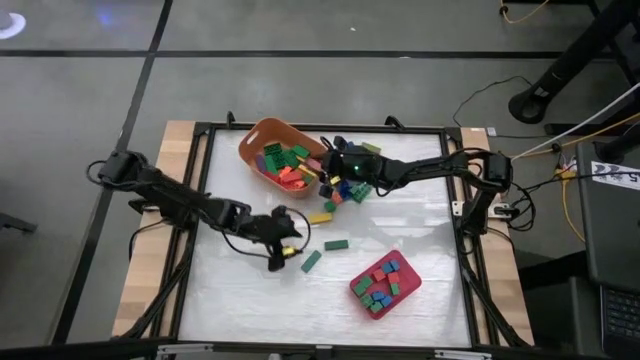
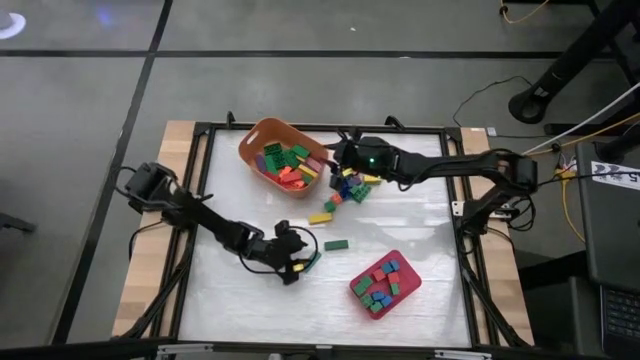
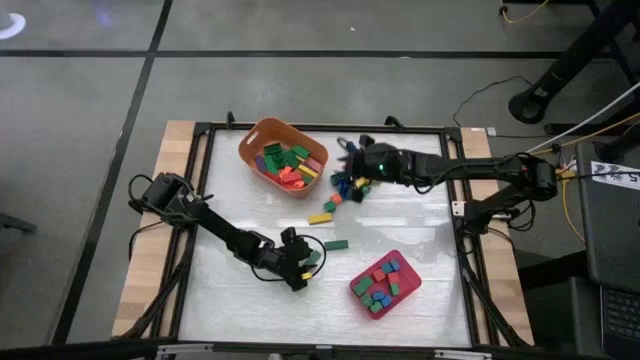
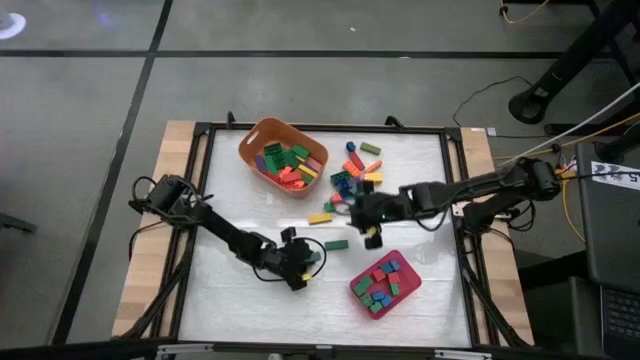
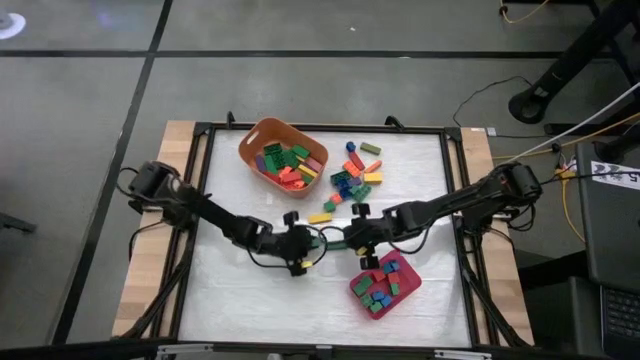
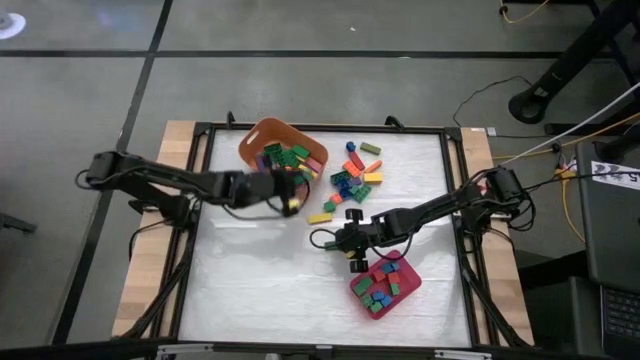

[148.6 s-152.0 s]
Task: Sort blocks by size
Put the large green block into the orange bin

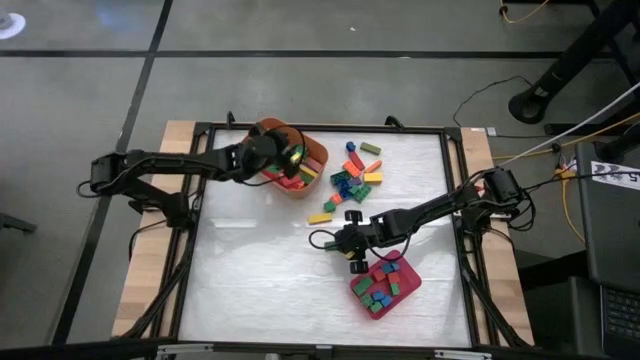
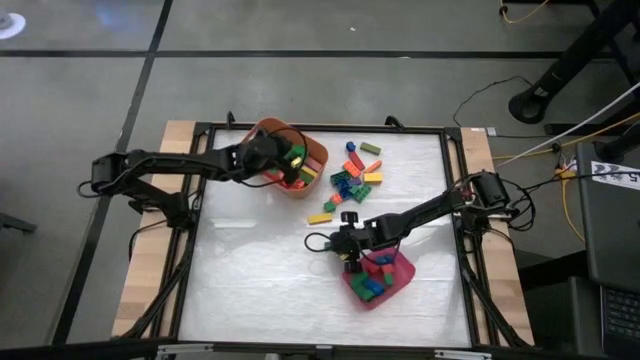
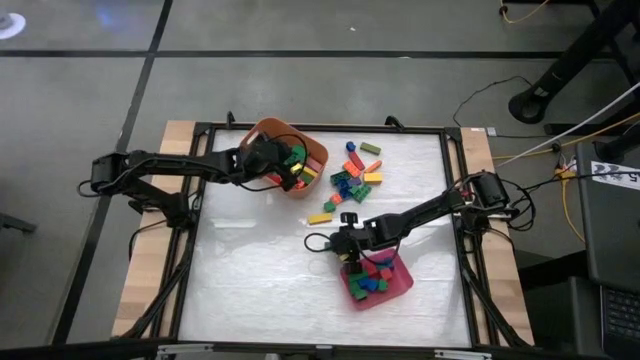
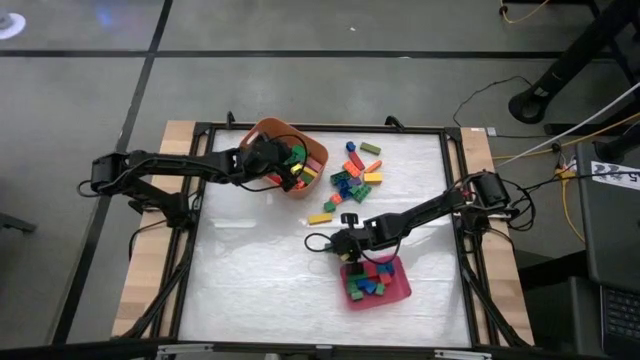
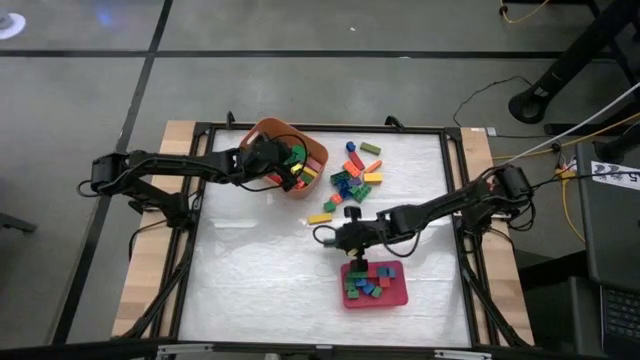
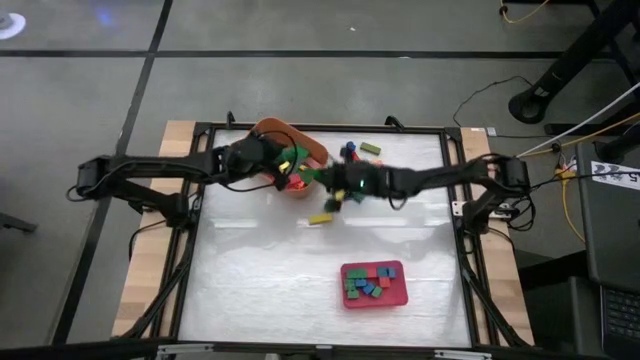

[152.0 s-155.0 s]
Put the large green block into the orange bin

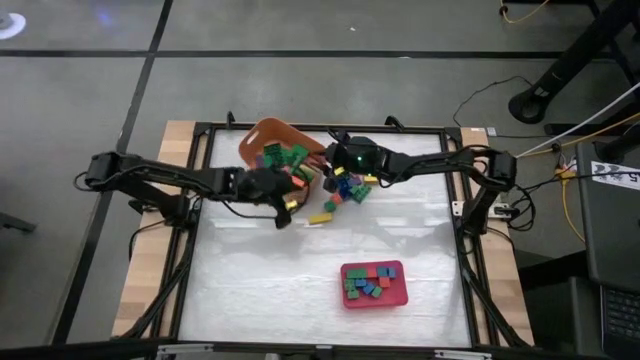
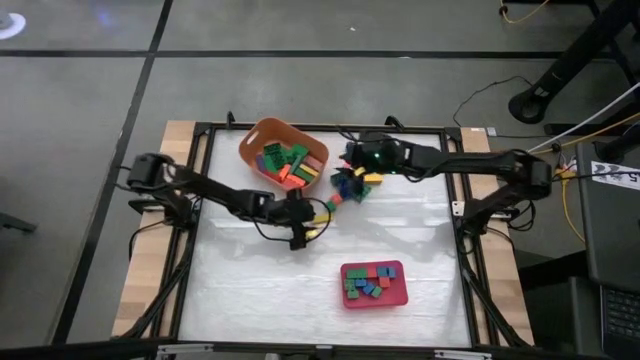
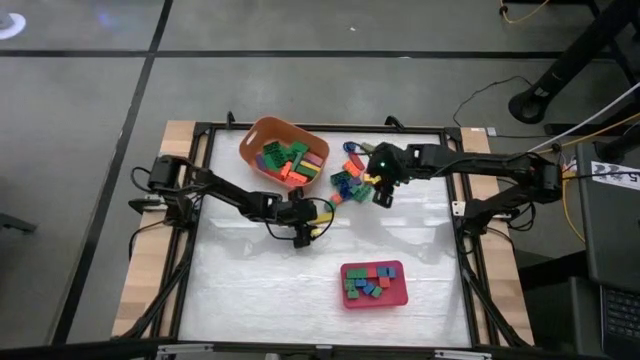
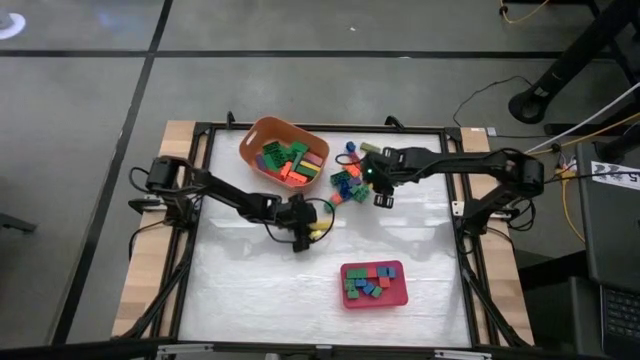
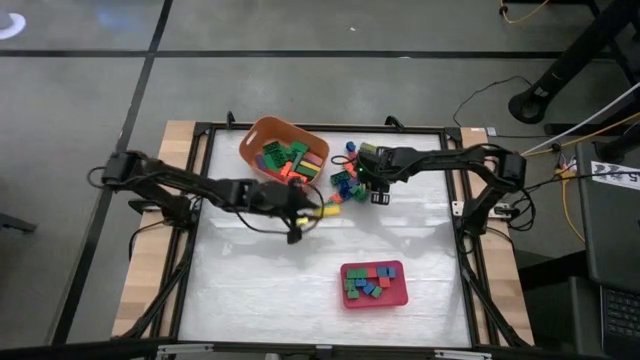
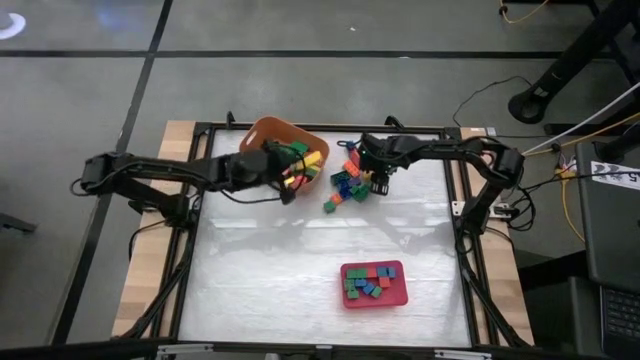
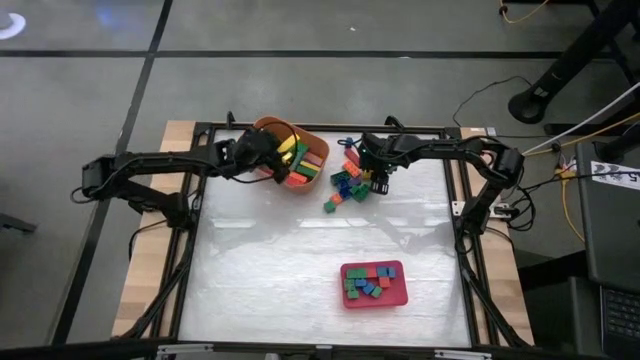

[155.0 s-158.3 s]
Put the large yellow block into the orange bin

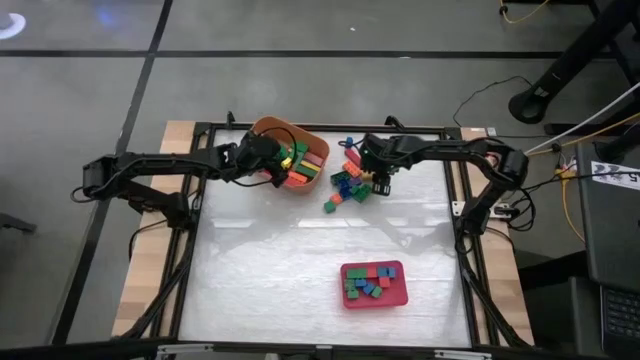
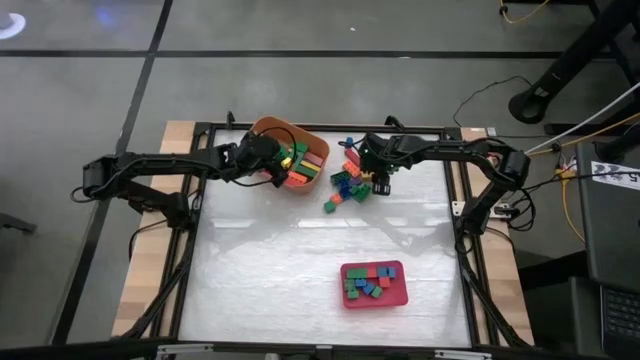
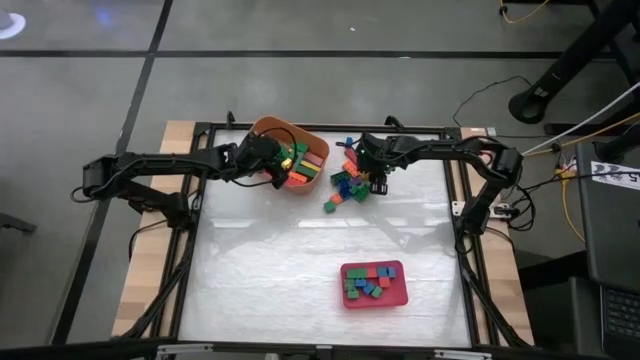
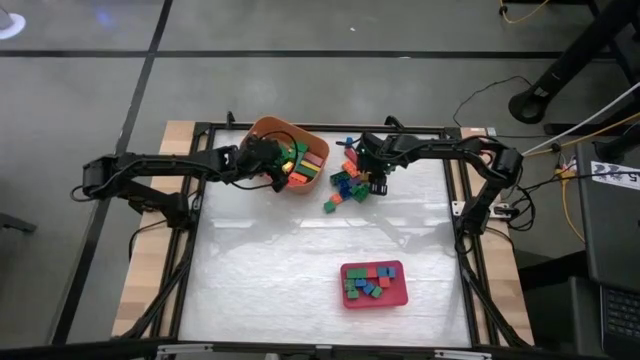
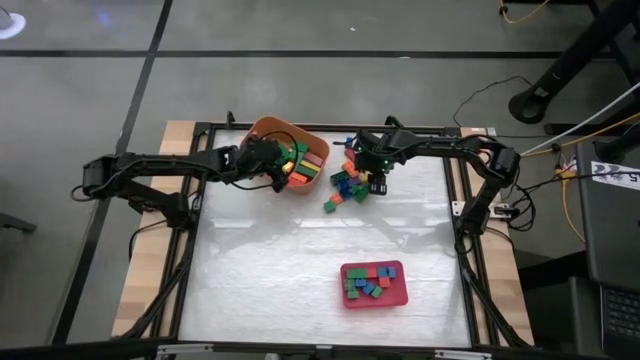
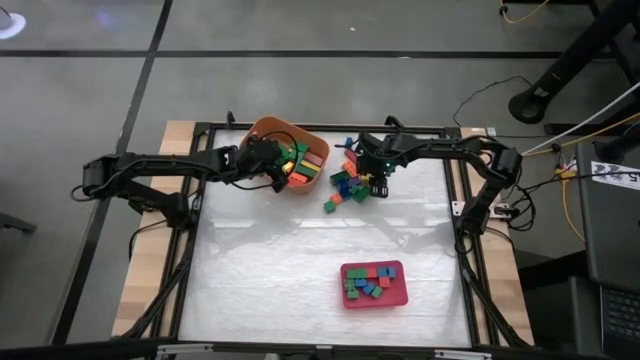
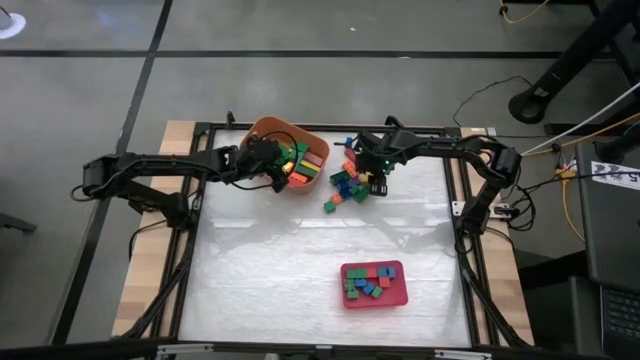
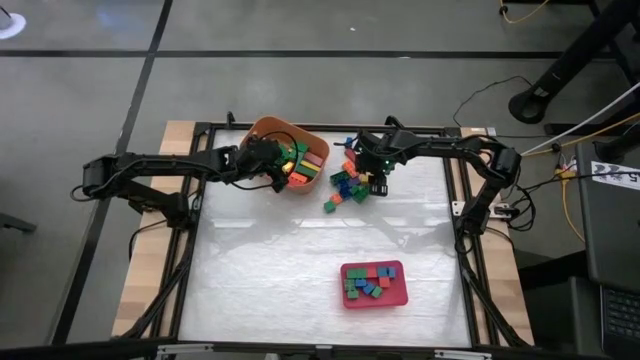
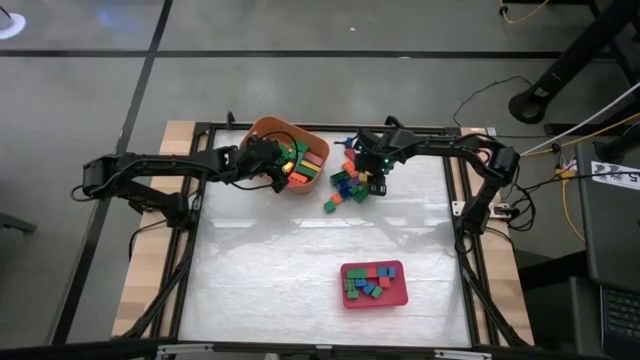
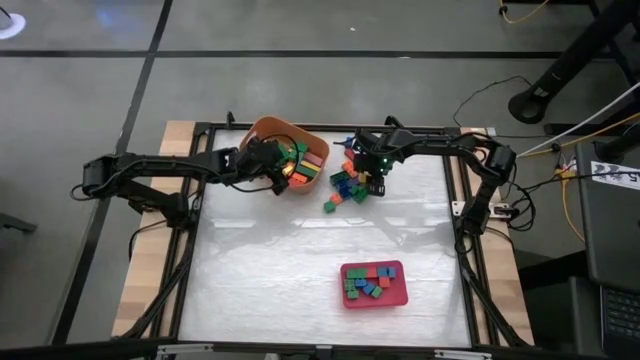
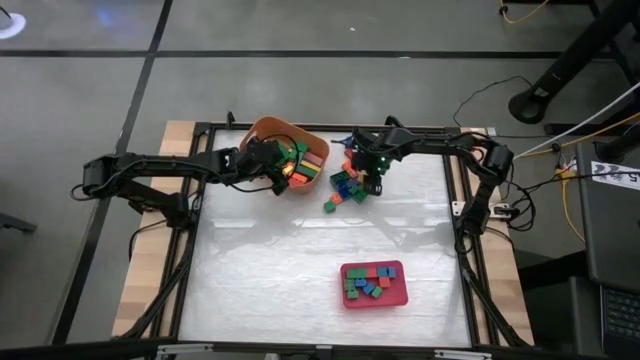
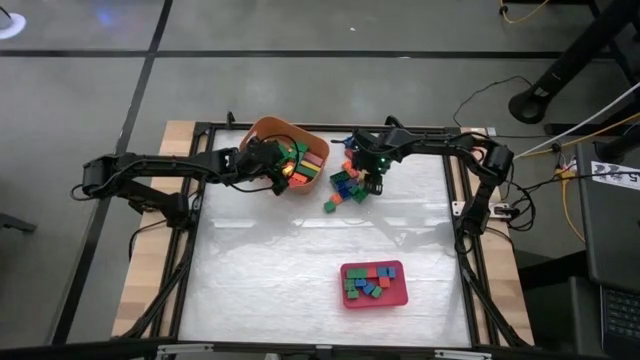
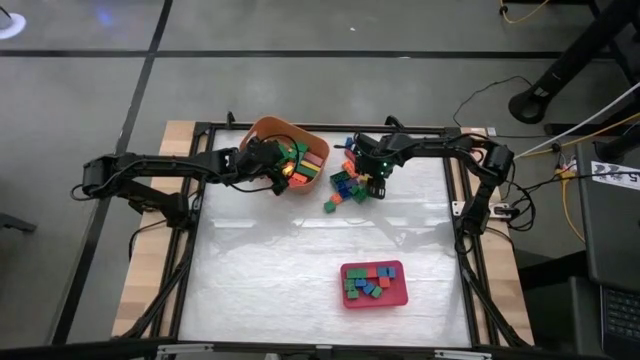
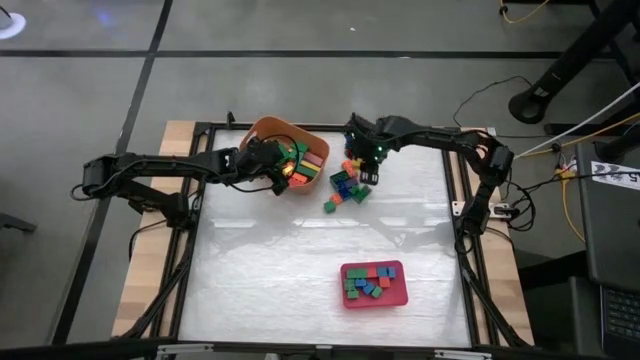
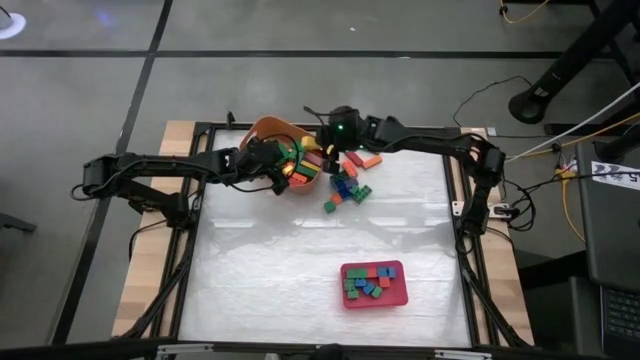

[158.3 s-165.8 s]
Put the large yellow block into the orange bin

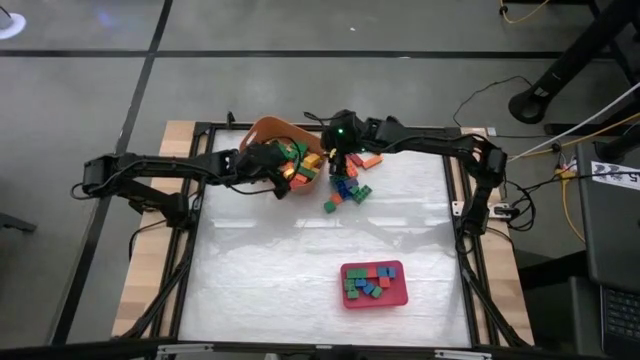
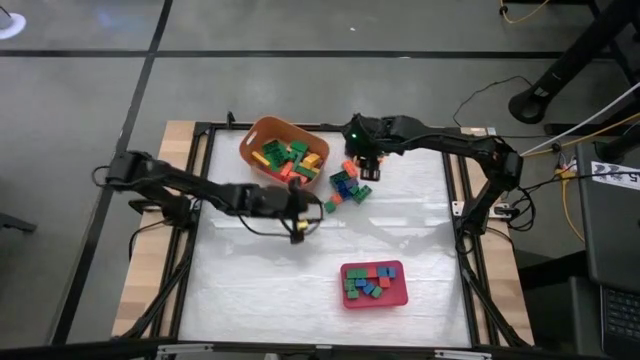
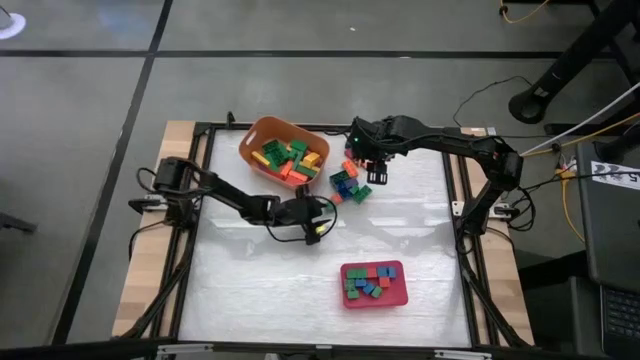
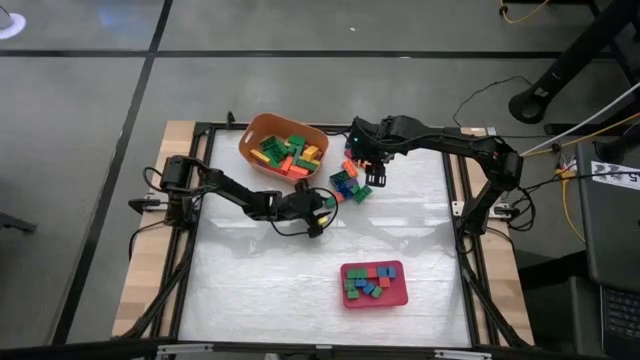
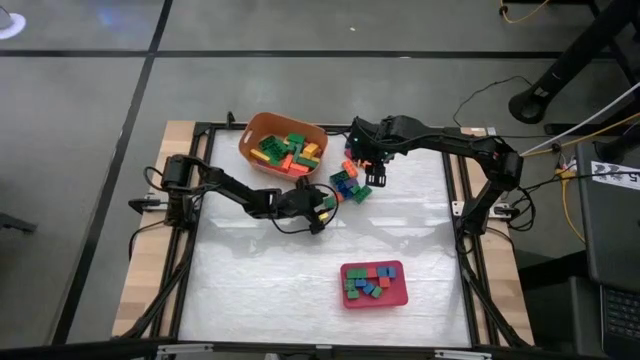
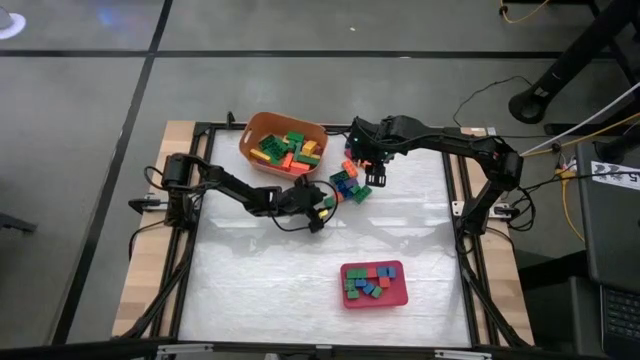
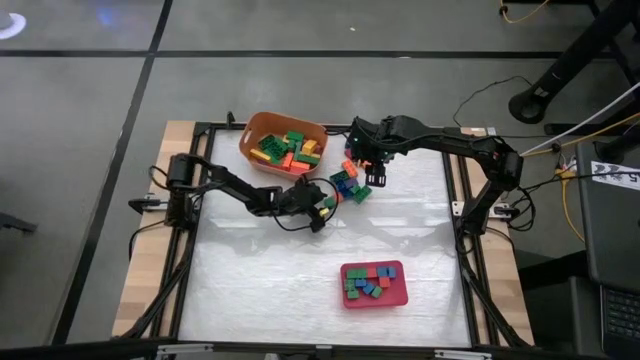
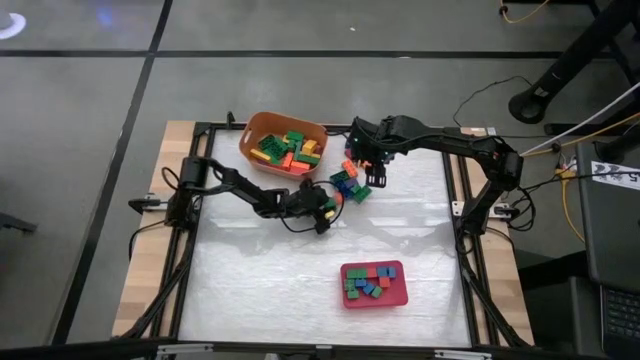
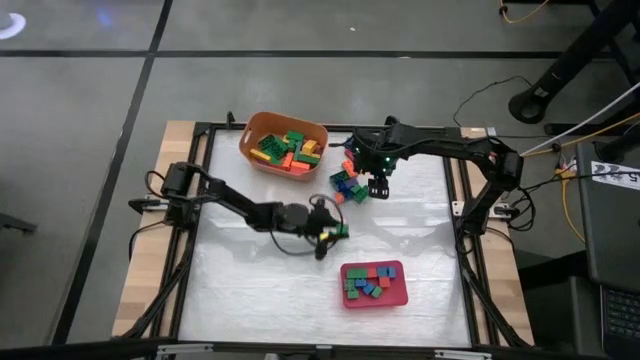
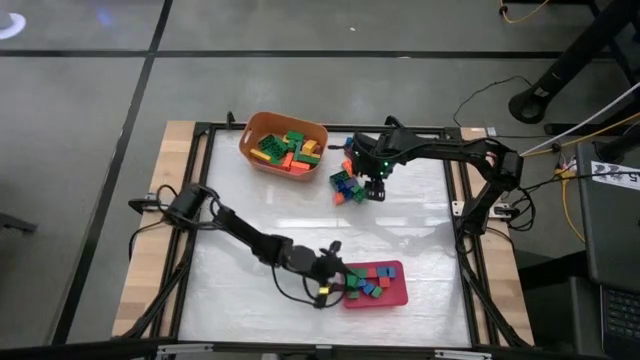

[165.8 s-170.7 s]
Put the small green block into the red bin
